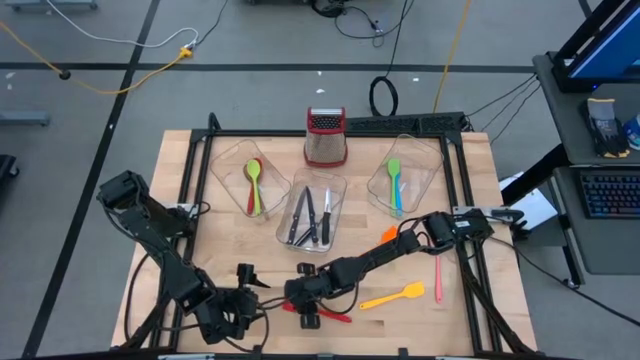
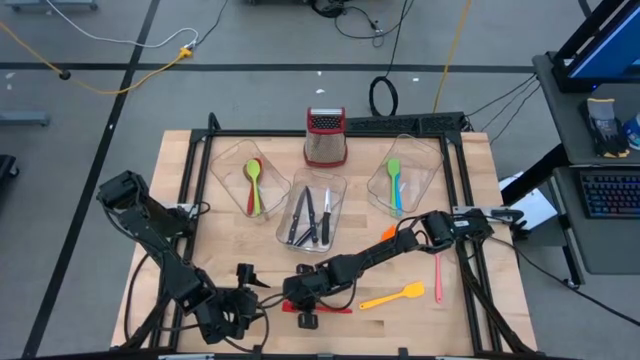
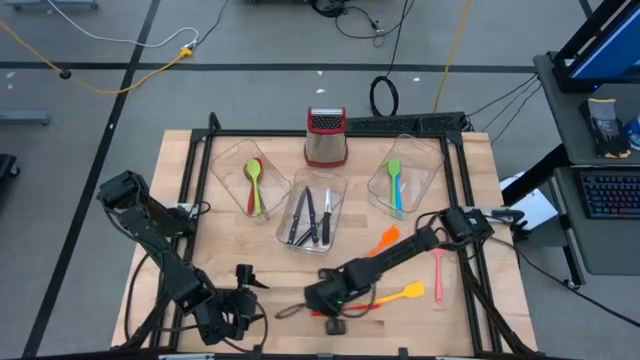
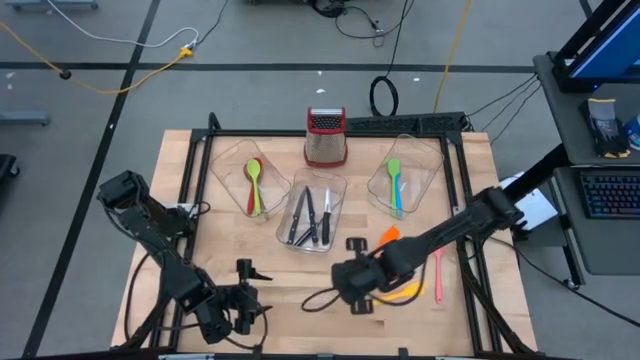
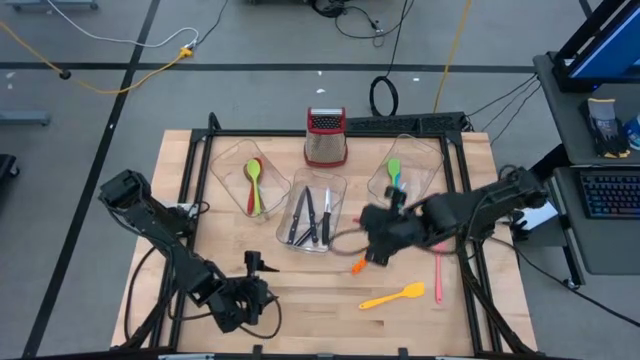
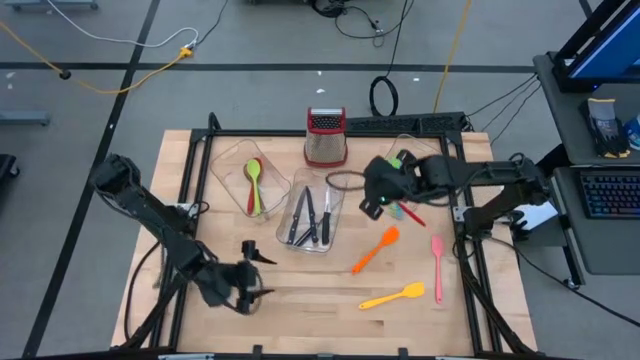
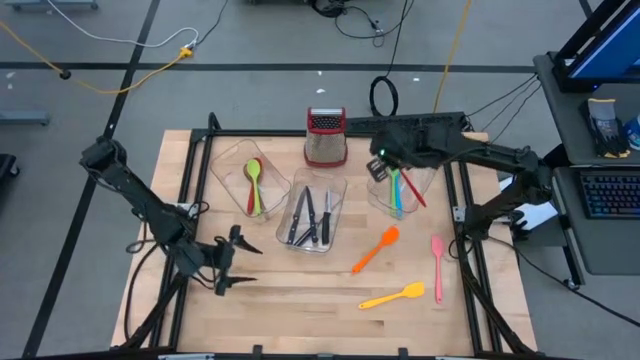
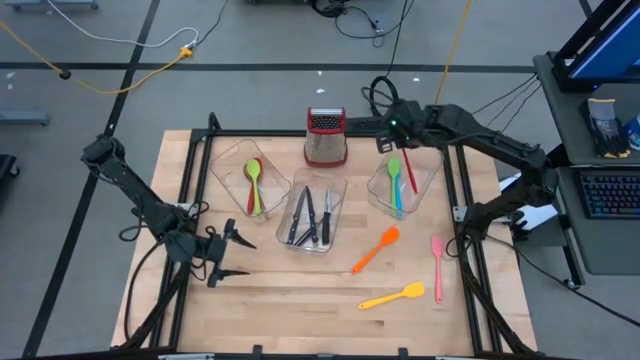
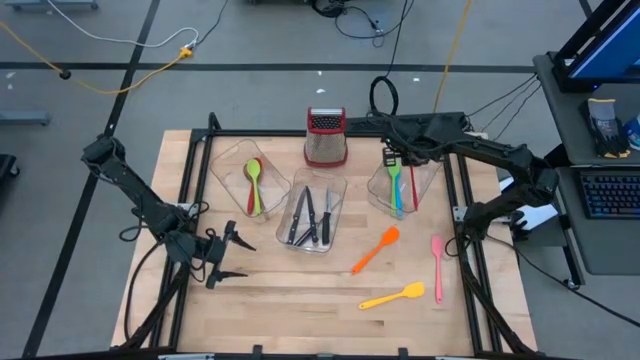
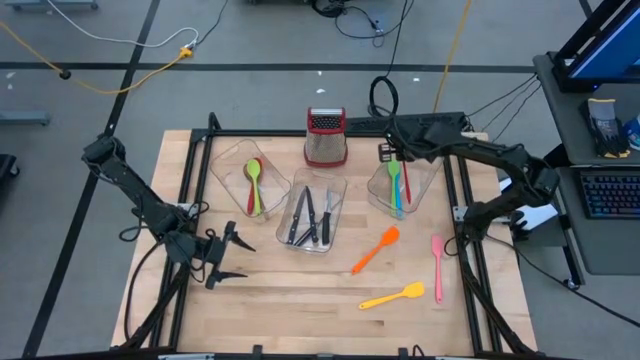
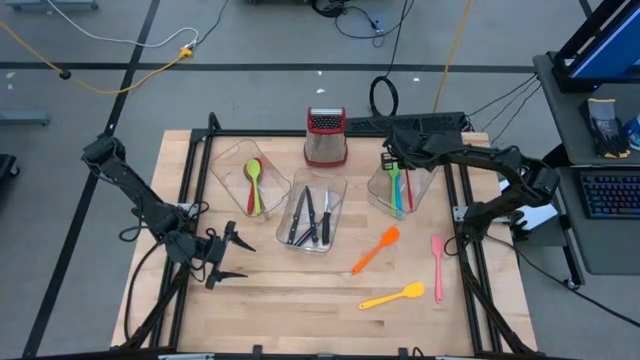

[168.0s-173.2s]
Task: Pick & Place Kitchen Items
Put the red spatula on the right transparent bin

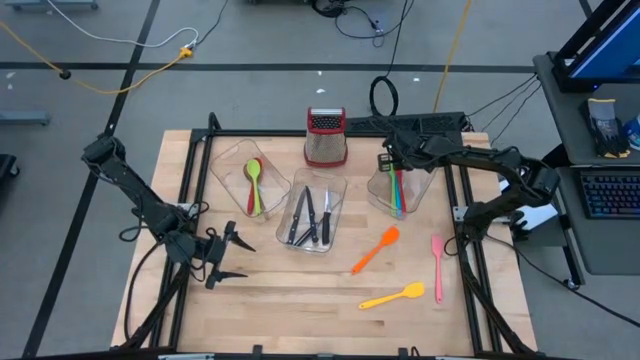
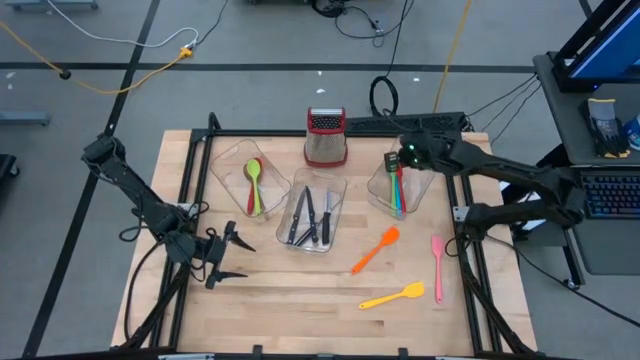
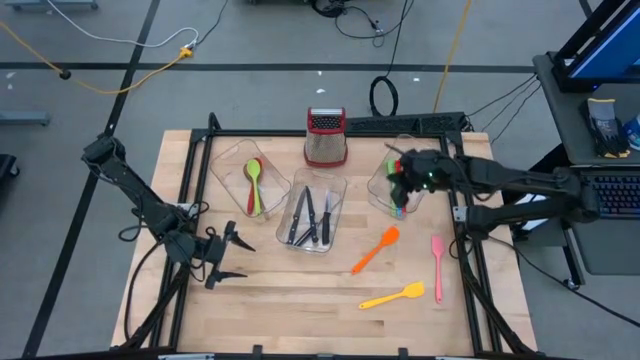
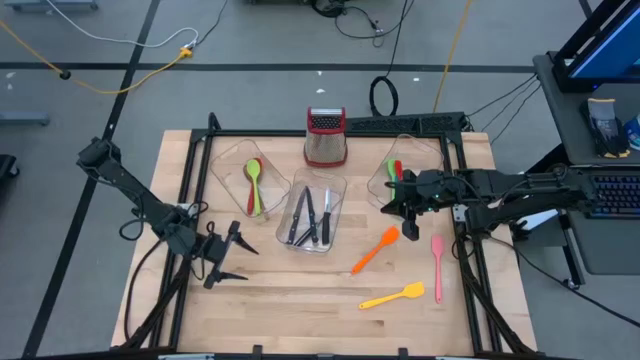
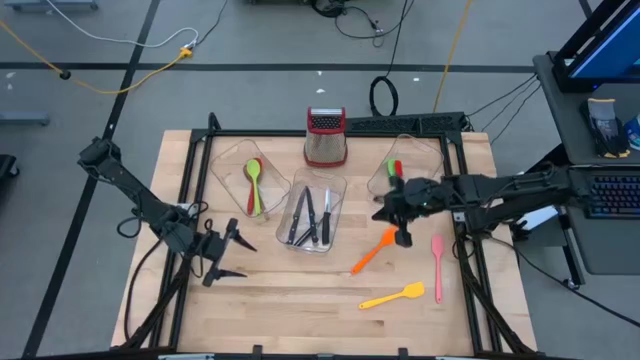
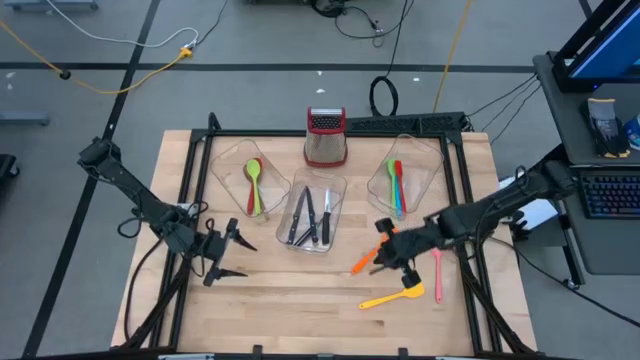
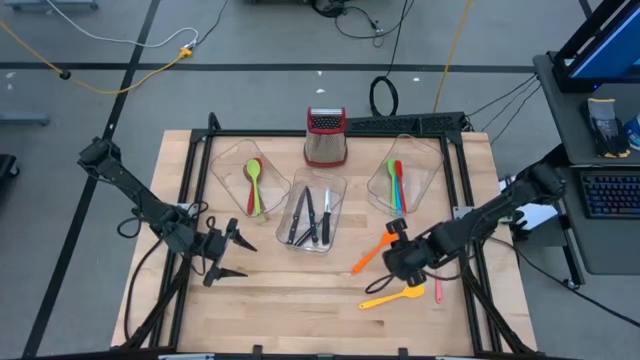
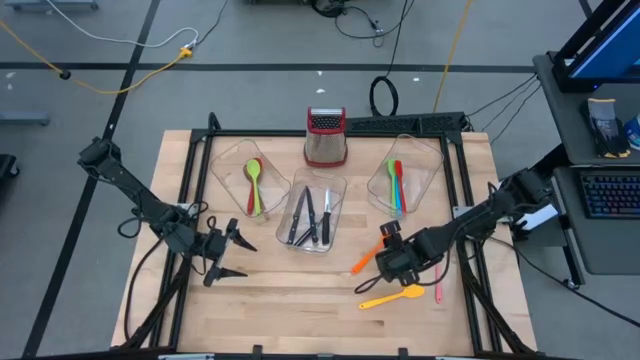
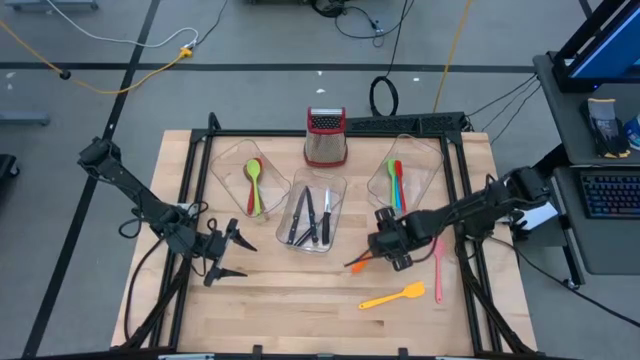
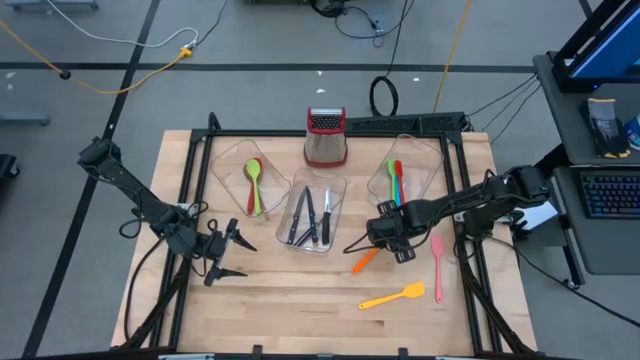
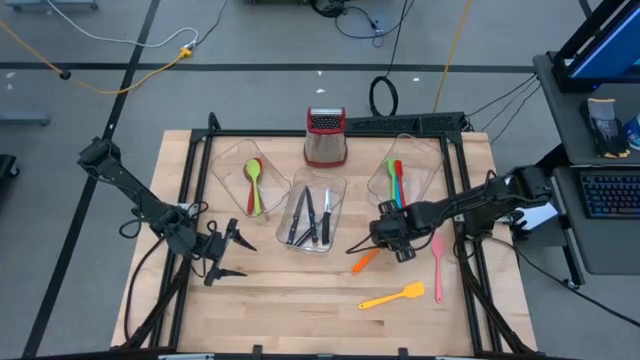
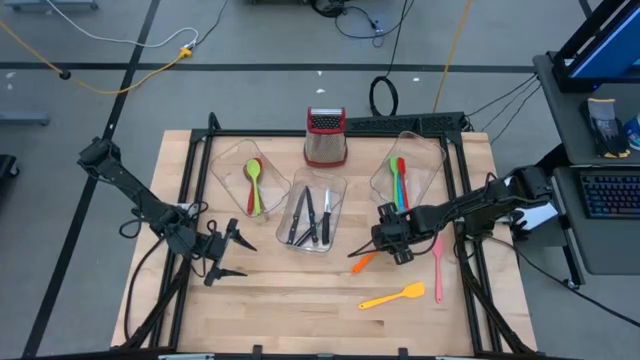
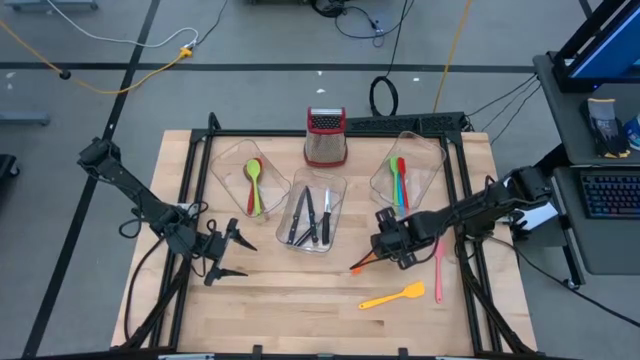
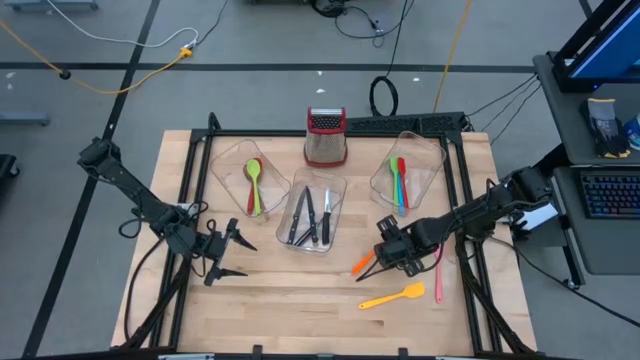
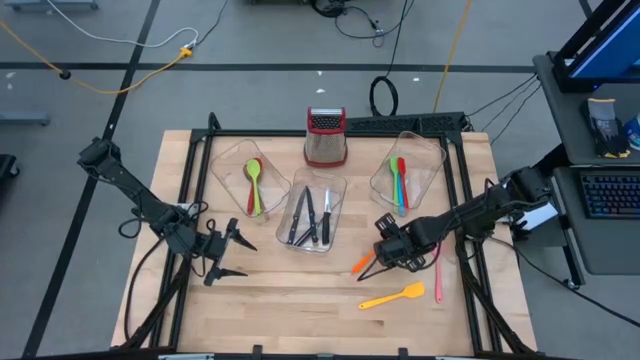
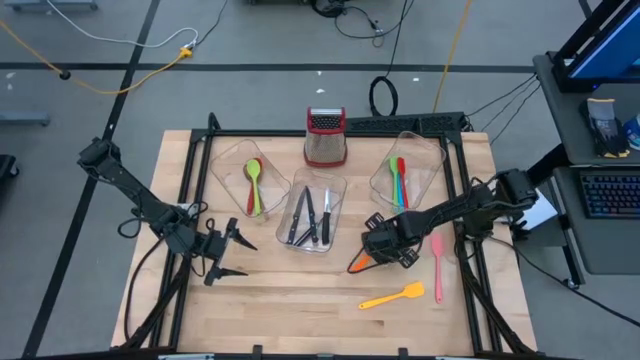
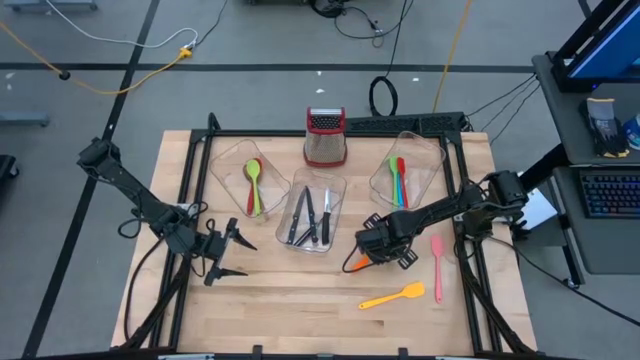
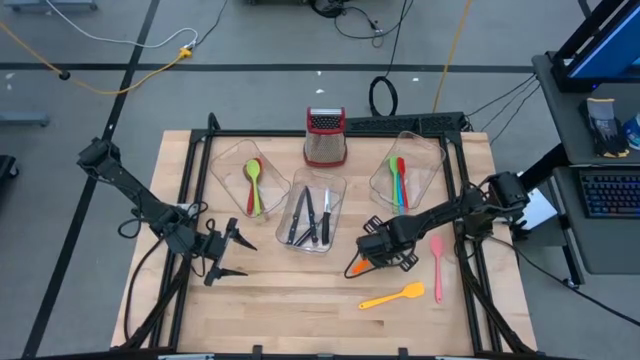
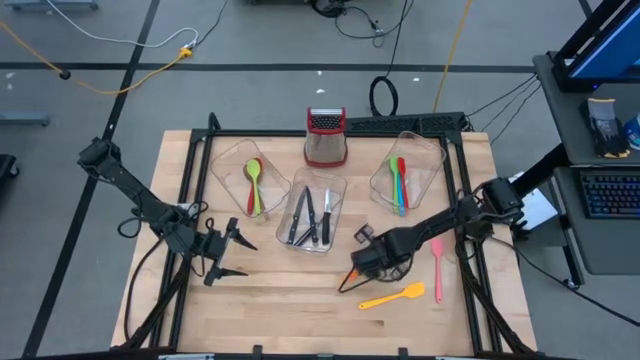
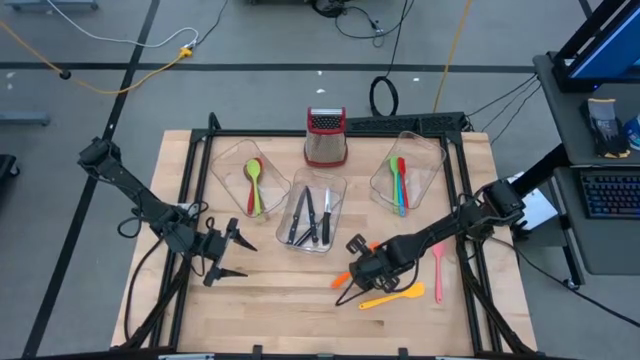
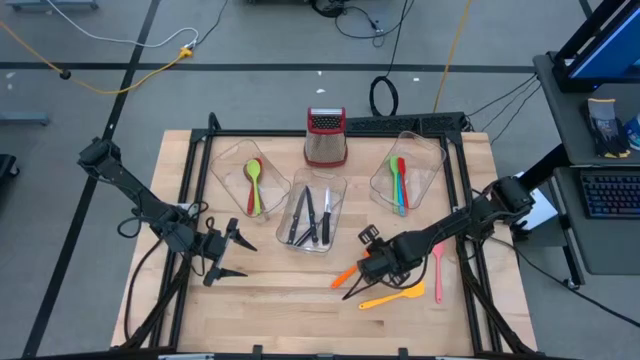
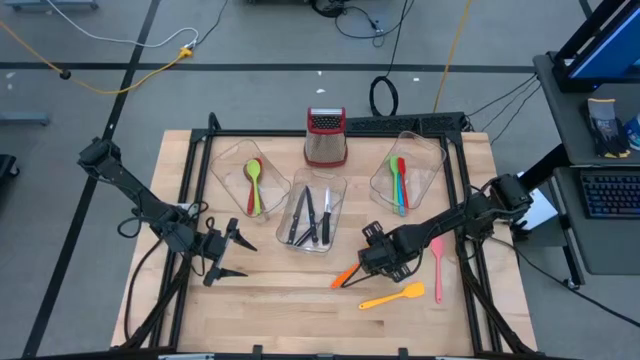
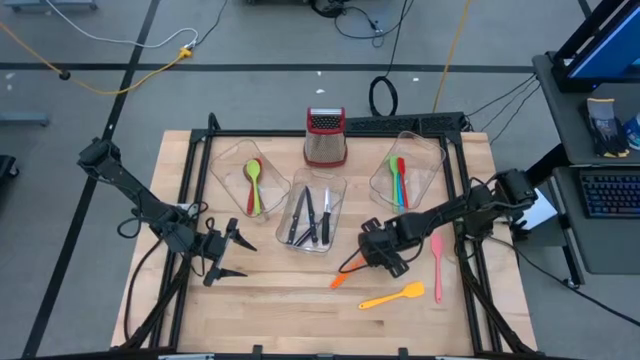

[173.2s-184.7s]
Put the orange spatula on the right transparent bin

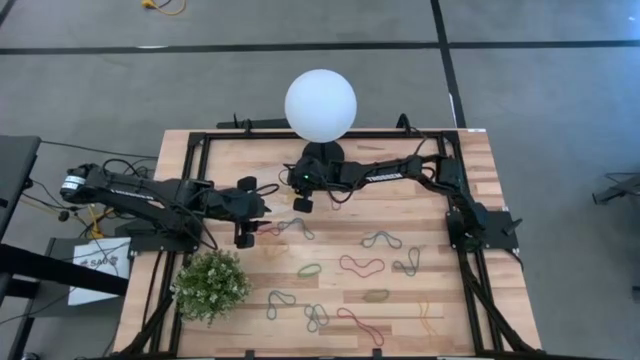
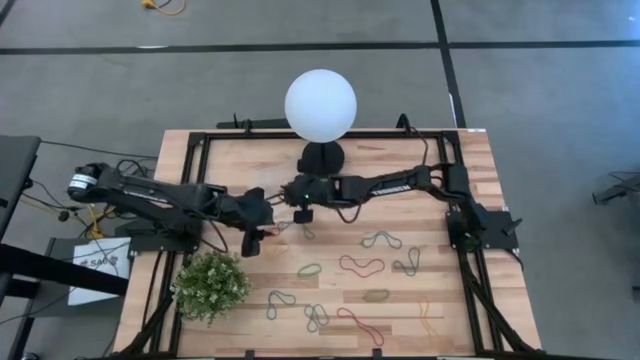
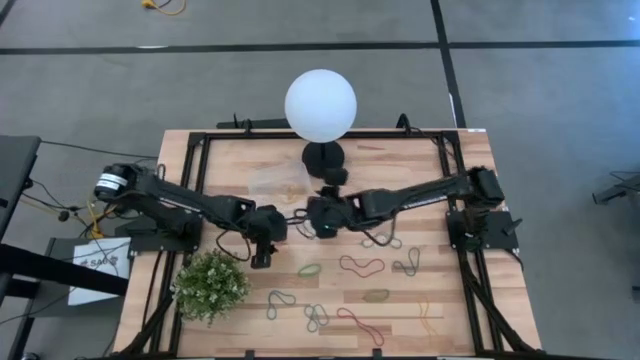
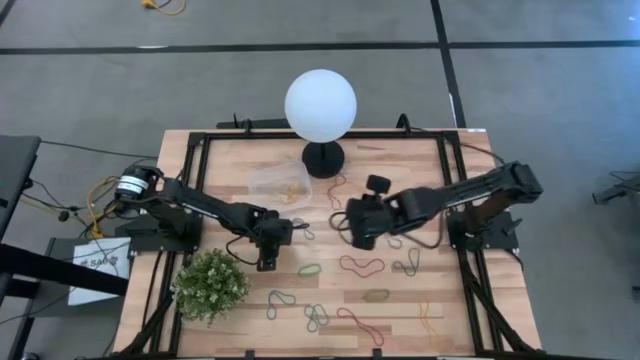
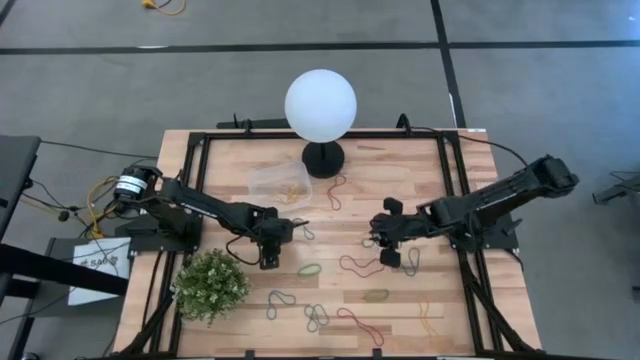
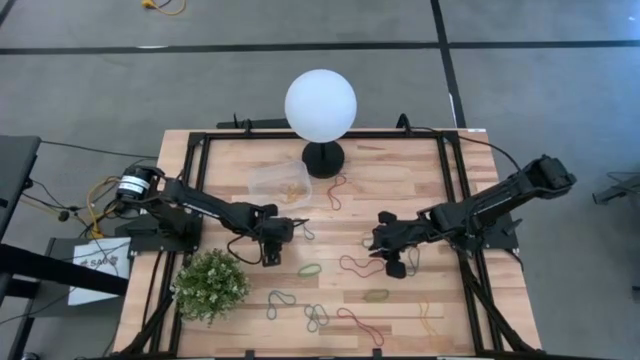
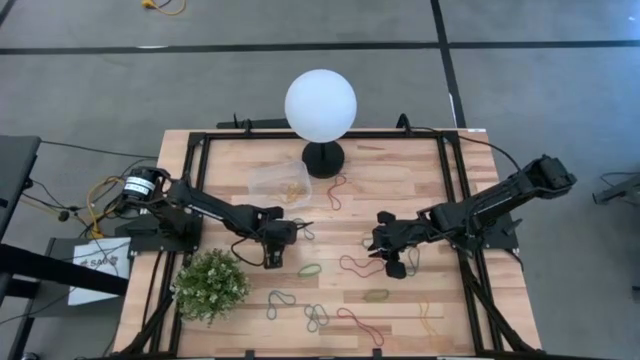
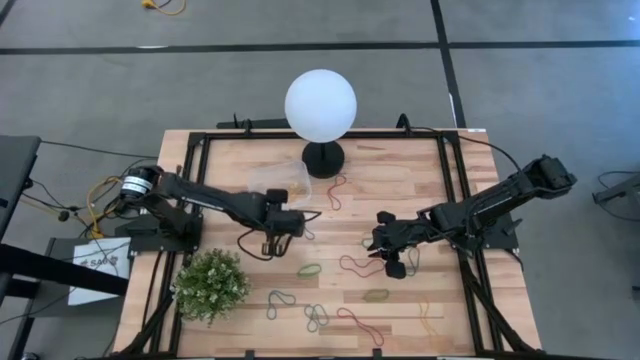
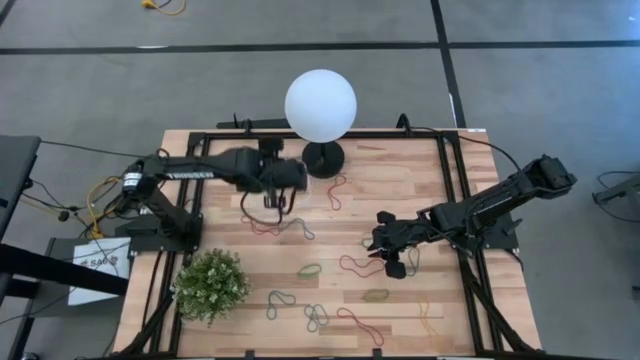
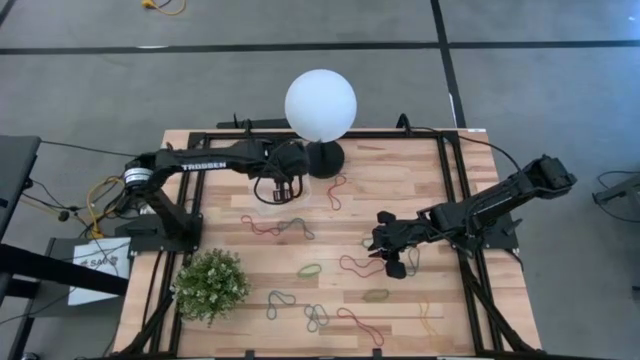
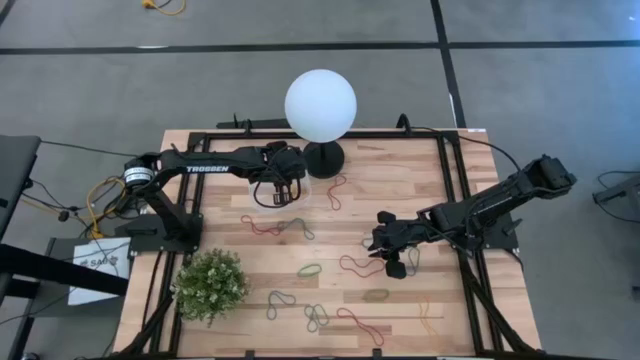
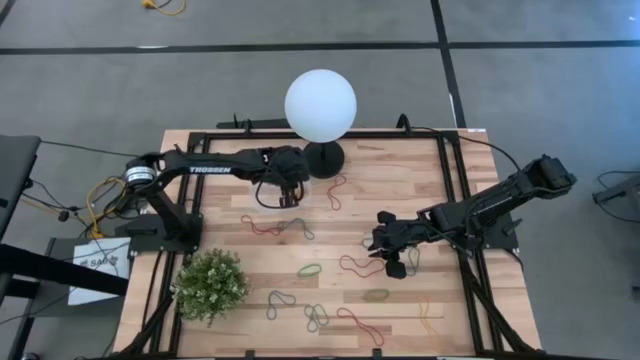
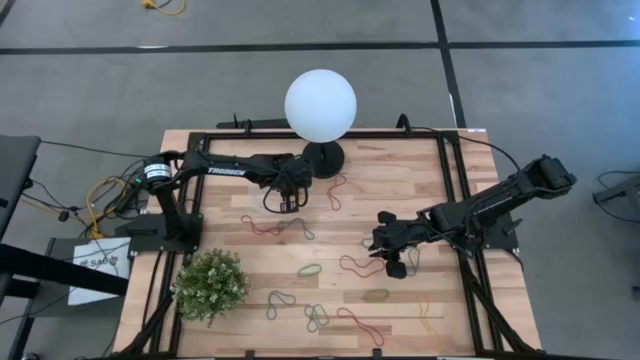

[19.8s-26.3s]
Task: Pick and place items into bin
Put the yellow rubber band into the transparent bin
